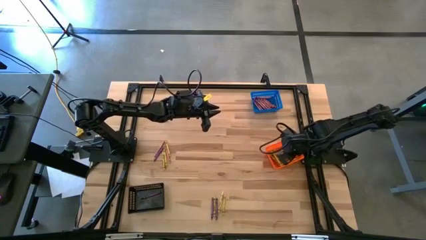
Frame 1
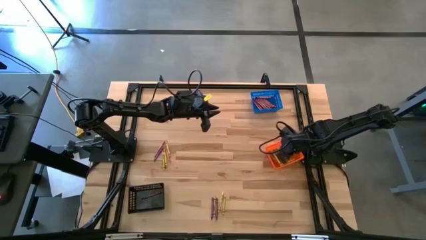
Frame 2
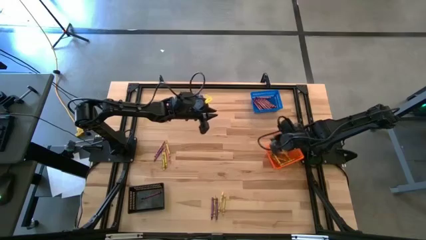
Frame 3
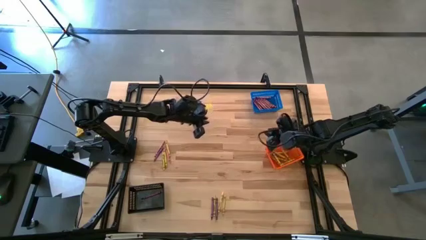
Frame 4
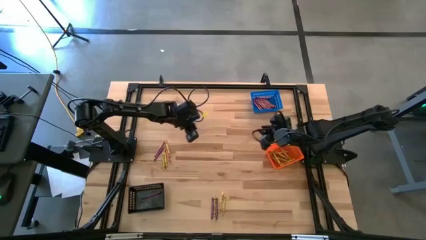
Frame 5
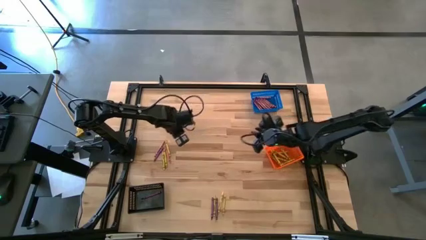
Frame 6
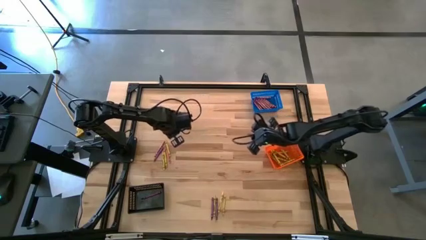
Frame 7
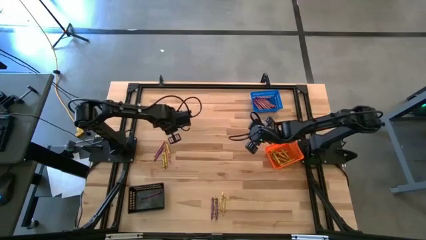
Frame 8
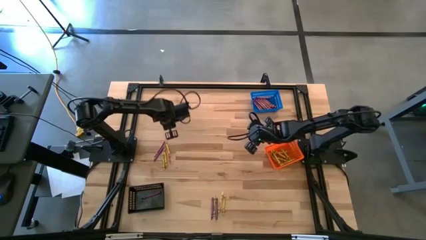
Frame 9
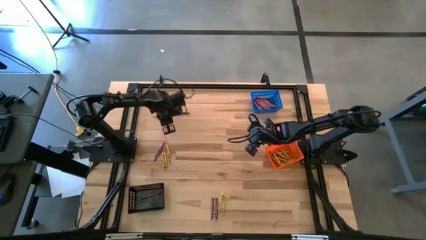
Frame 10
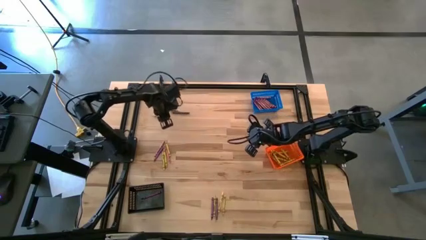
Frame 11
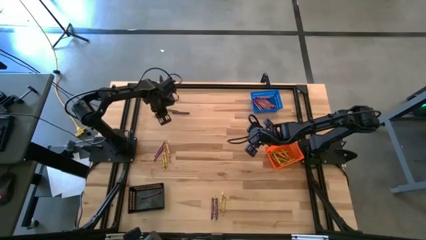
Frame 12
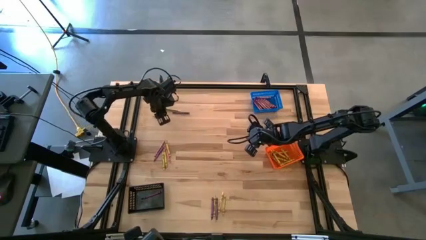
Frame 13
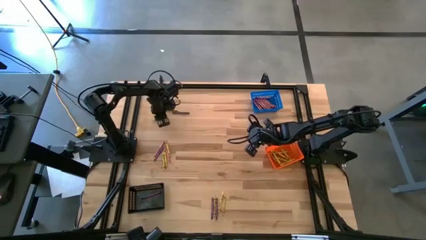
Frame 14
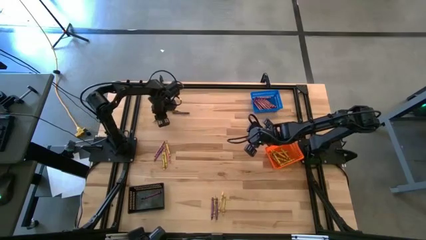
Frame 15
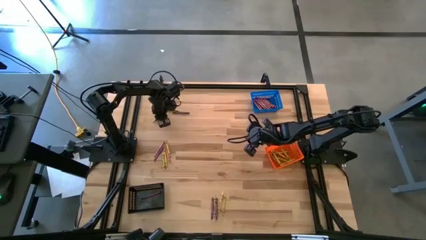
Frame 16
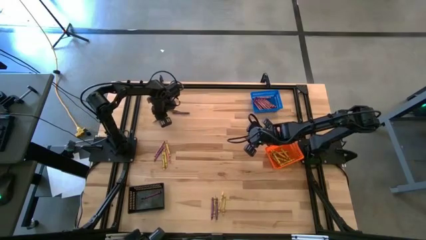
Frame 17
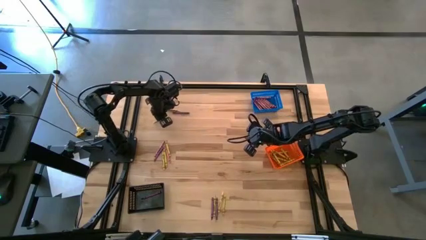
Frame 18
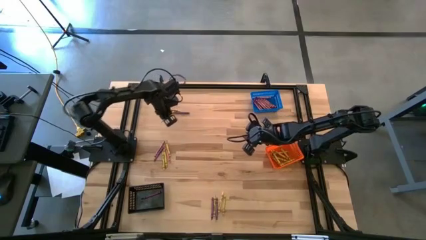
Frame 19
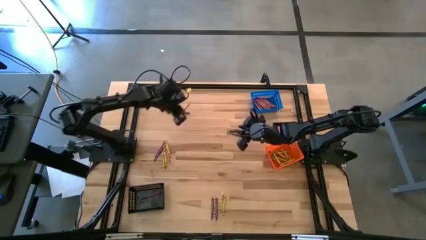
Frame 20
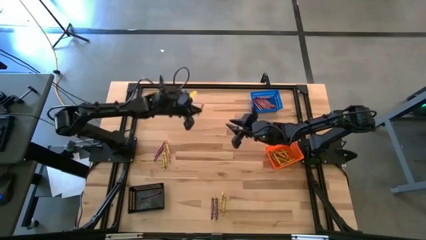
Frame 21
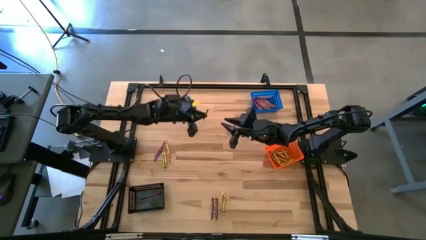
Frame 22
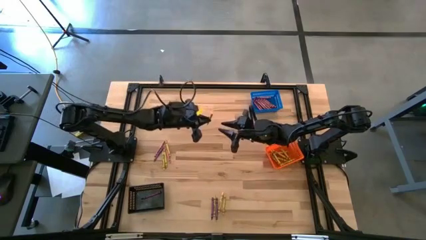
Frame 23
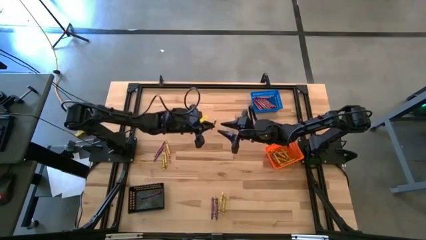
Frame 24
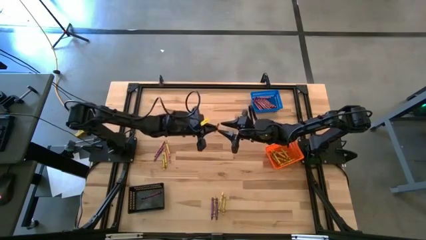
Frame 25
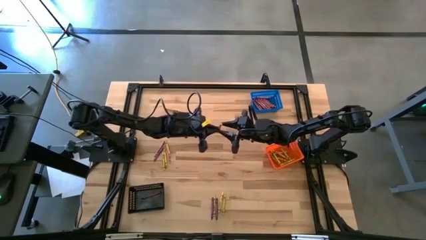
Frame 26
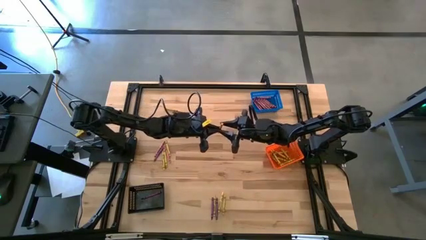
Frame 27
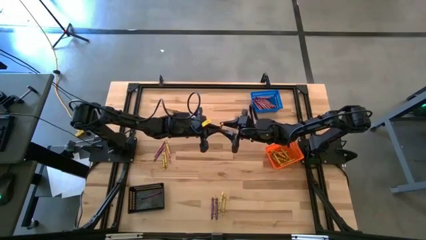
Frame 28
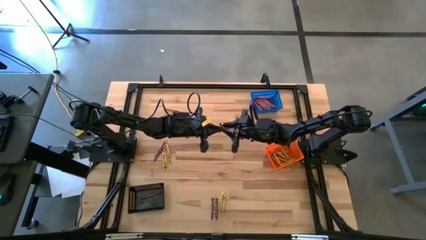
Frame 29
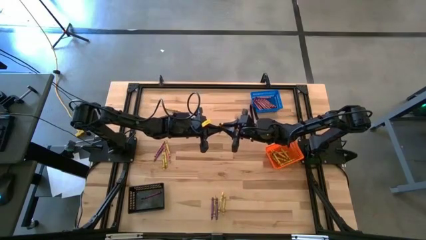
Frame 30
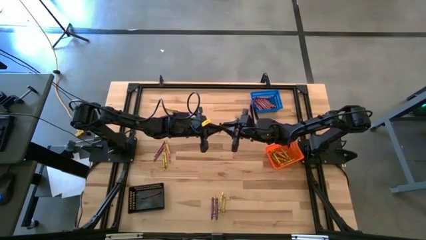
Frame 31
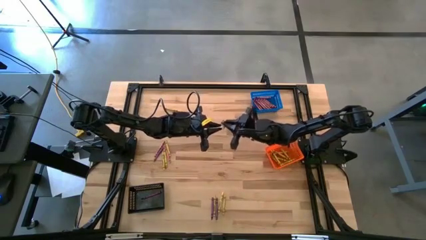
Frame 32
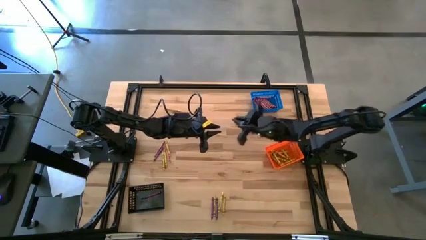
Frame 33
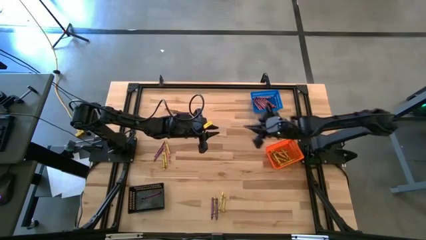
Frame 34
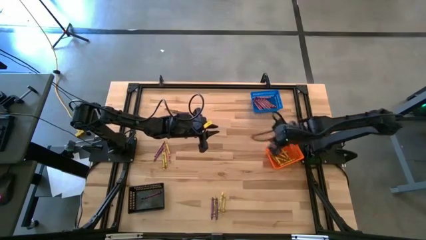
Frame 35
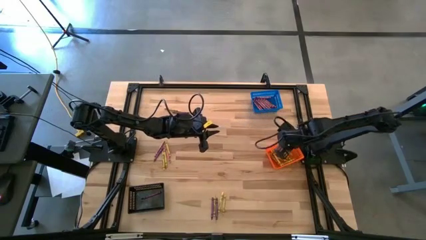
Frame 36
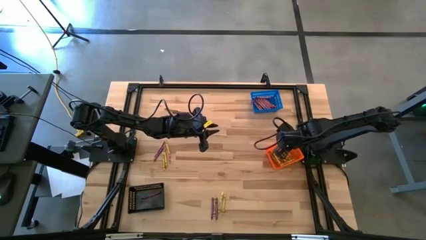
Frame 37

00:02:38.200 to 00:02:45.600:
Task: Sort crayons
Put the yellow crayon into the orange basket

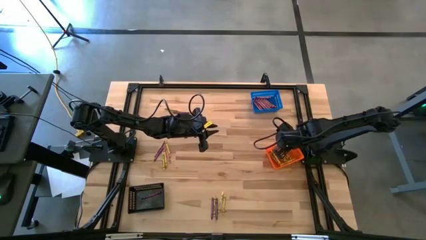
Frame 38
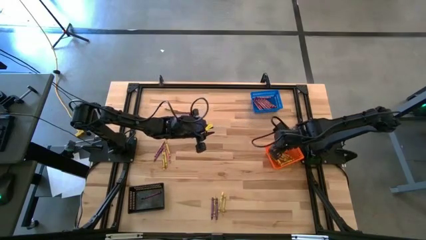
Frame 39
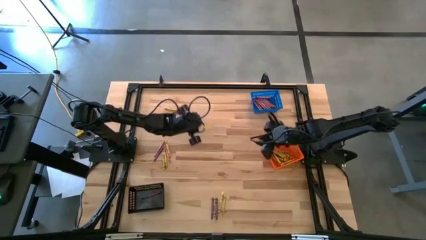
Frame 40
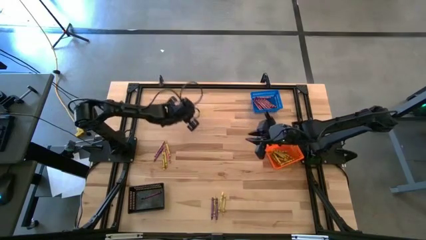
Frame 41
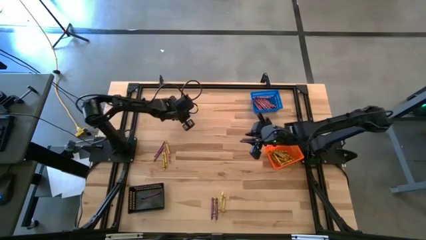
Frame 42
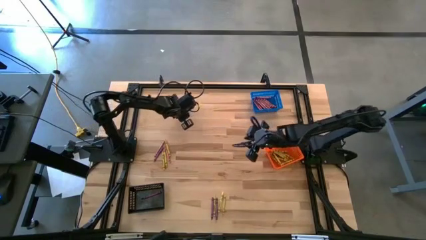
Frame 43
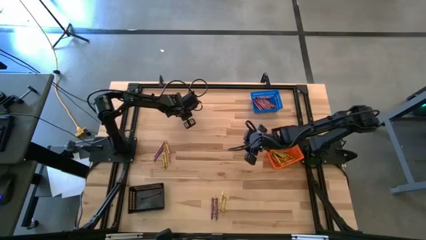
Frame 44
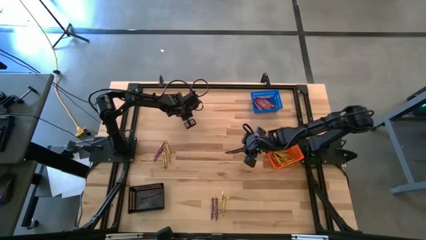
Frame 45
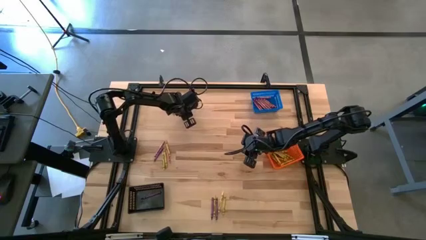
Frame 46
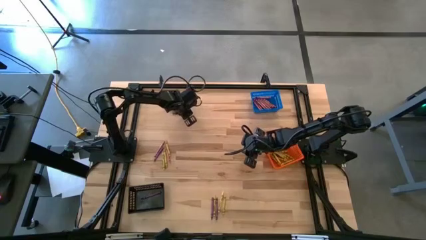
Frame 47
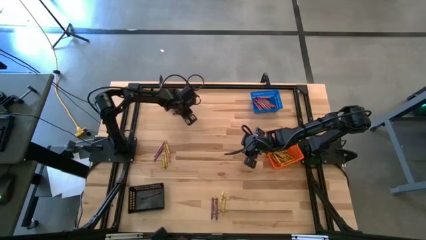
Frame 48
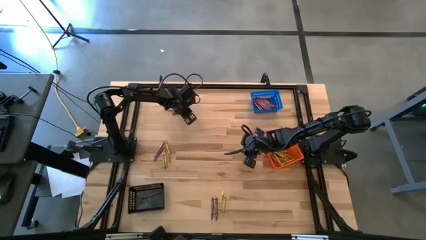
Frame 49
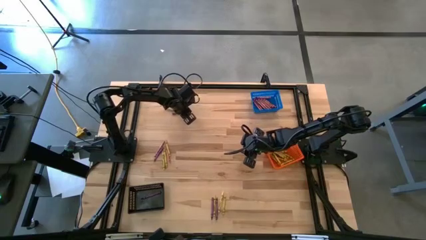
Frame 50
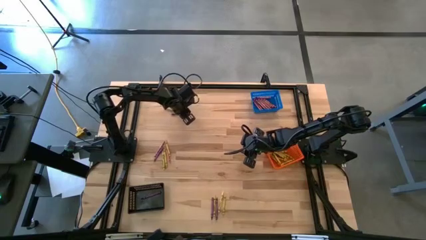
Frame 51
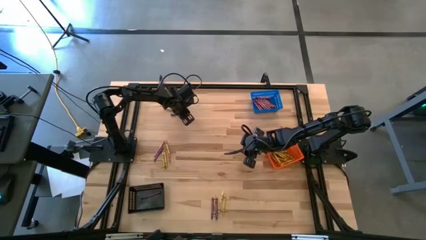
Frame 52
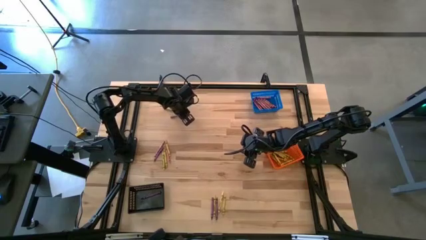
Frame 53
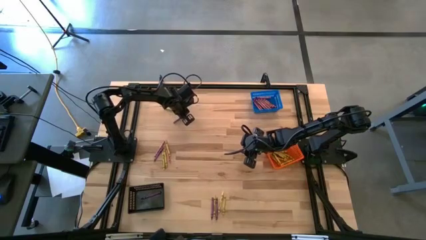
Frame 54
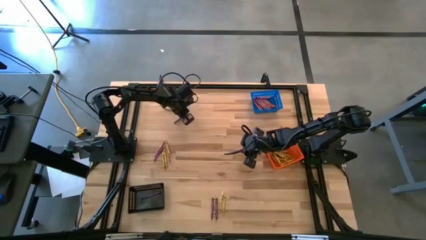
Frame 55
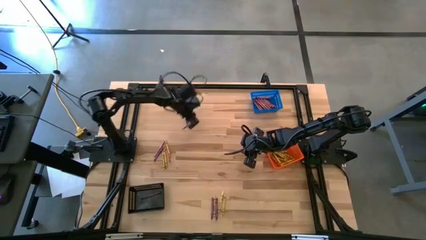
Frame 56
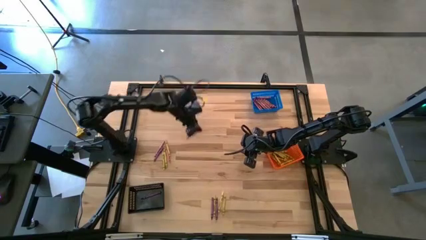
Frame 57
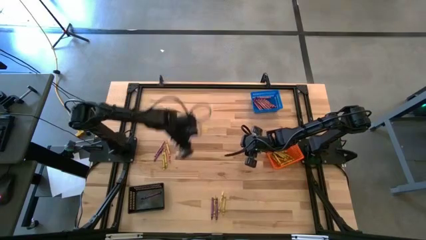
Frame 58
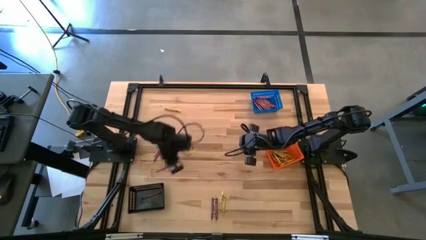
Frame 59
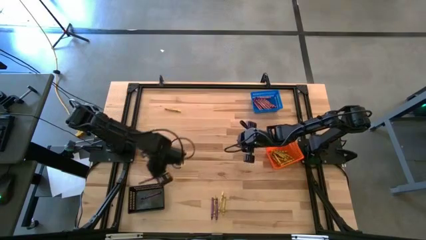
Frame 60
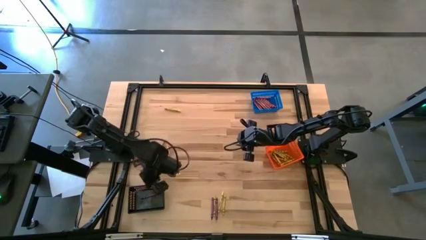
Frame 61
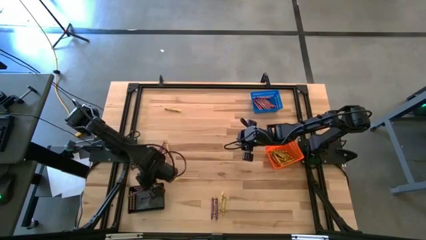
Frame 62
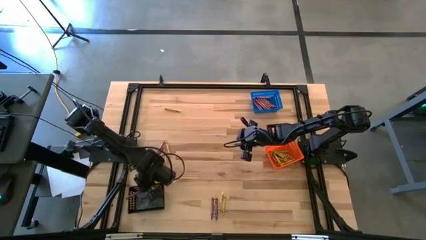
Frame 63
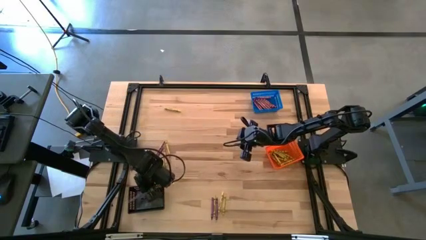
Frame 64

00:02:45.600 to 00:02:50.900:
Put the violet crayon into the black basket

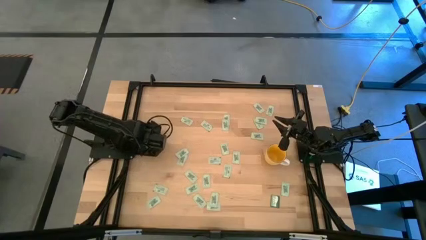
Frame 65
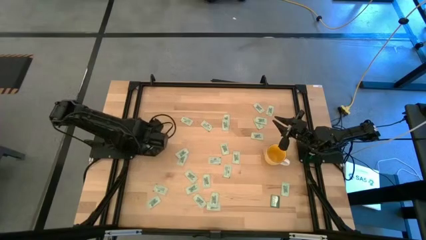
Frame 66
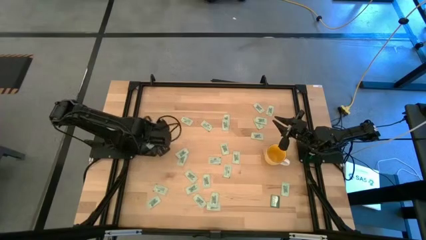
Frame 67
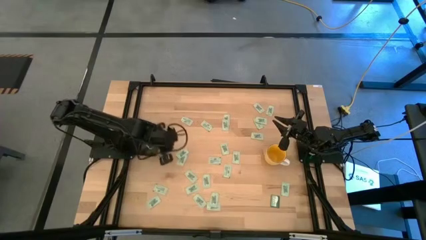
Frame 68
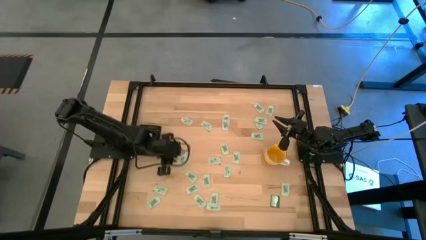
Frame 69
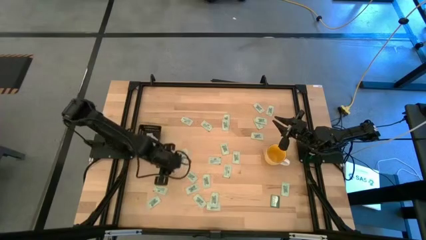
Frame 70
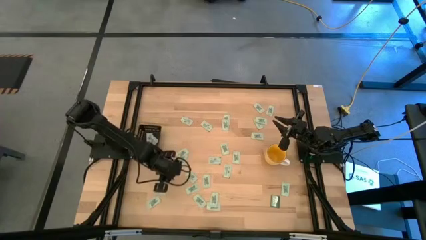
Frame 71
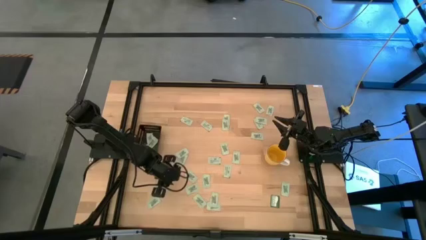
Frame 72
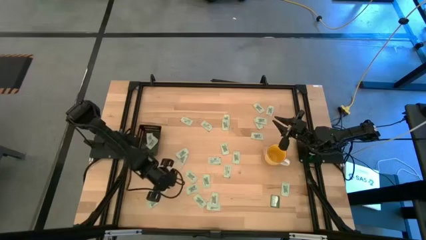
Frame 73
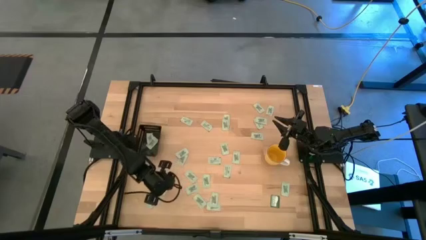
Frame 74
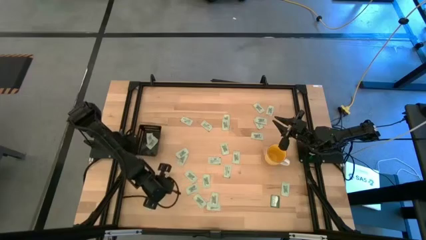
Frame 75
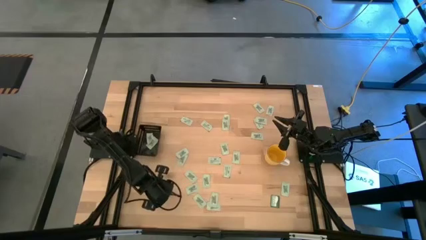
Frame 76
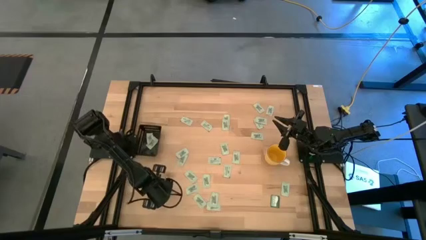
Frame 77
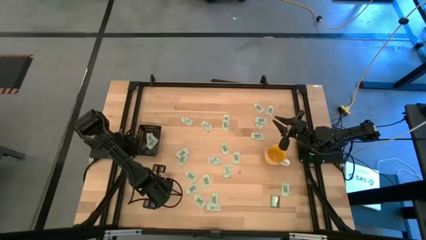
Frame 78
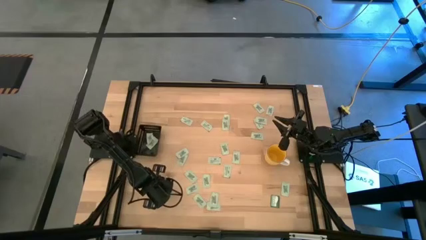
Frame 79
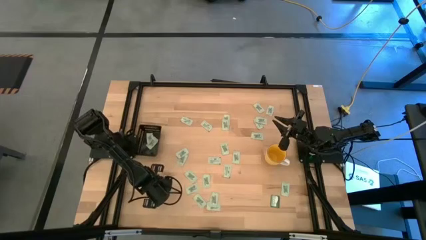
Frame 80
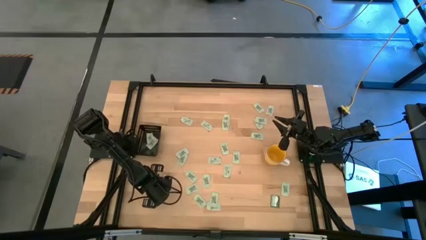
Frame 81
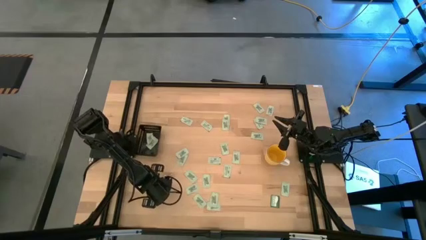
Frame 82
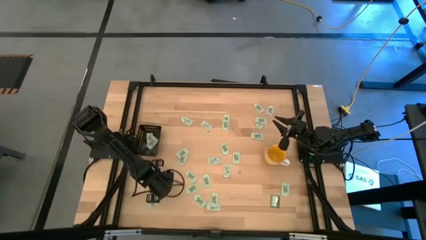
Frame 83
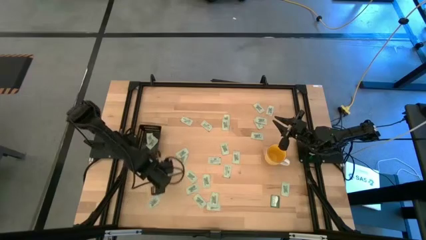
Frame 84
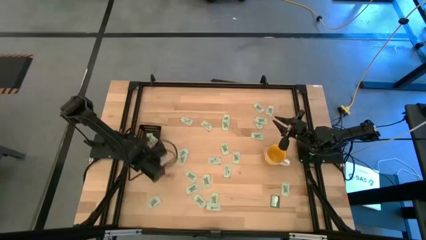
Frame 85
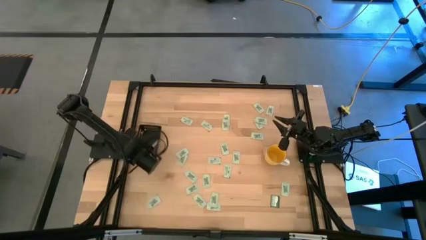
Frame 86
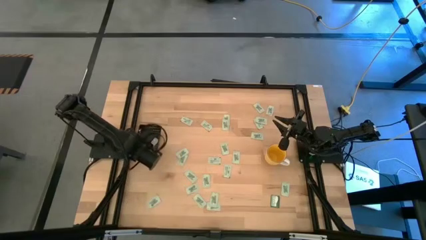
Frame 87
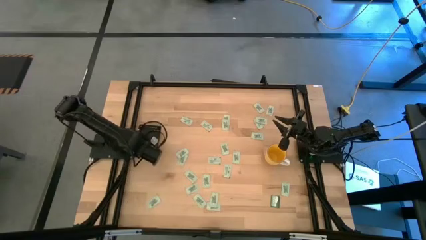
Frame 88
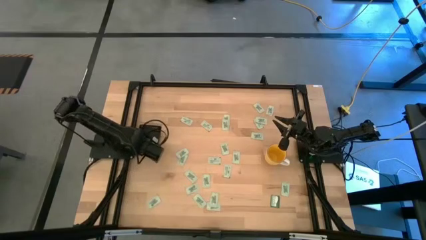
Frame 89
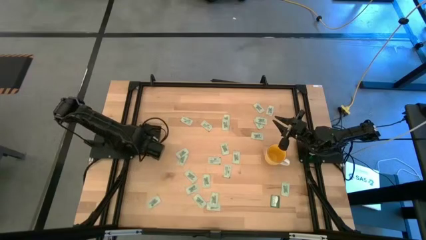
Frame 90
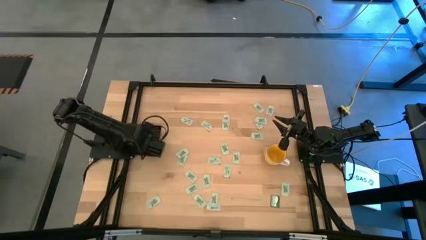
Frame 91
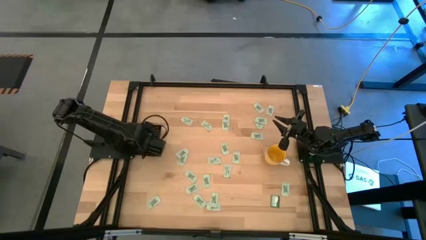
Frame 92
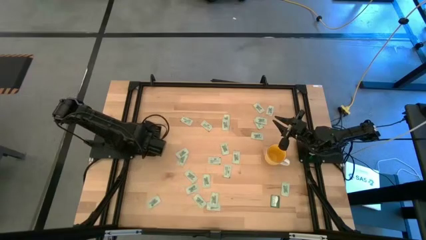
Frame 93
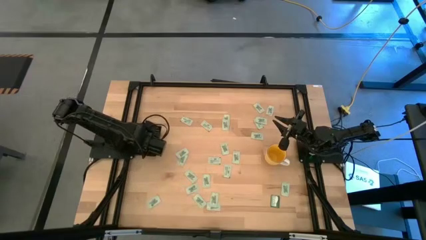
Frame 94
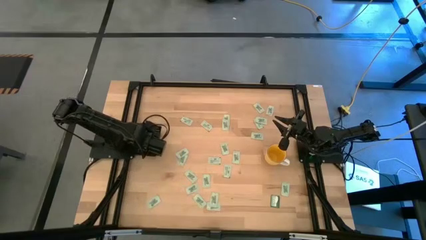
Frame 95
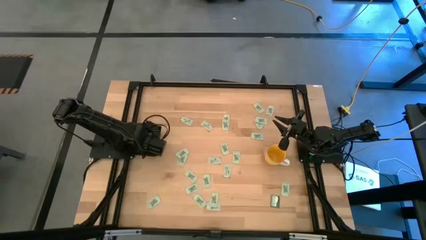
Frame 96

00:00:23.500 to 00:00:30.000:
Task: Pick and place Stevia / Truvia into bins
Put the stevia packet into the black bin
